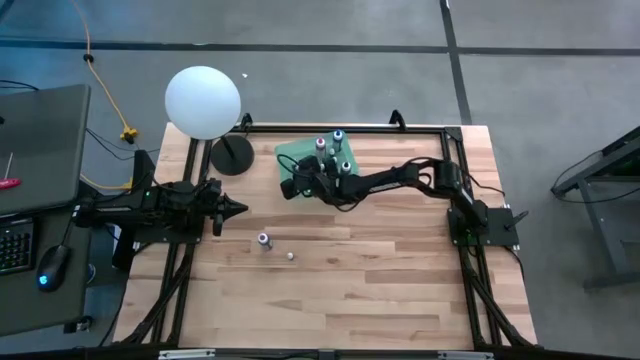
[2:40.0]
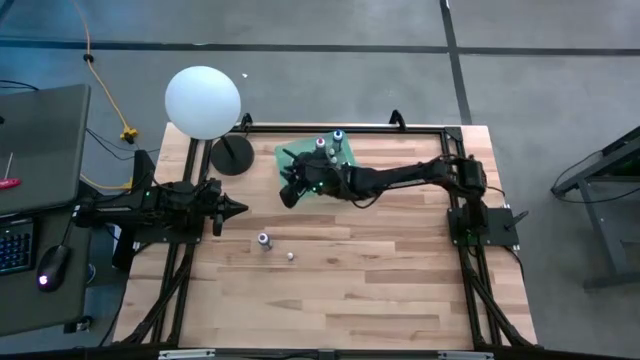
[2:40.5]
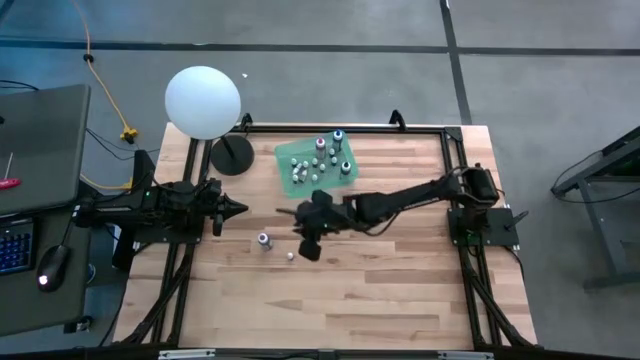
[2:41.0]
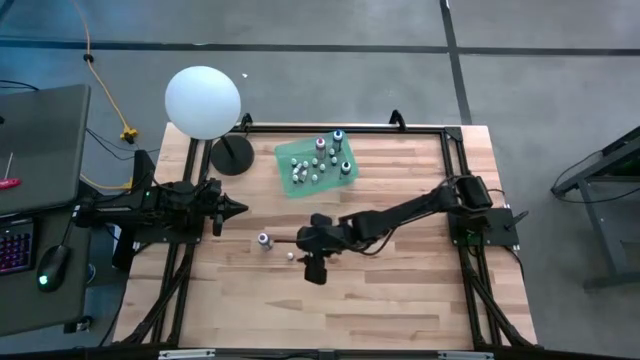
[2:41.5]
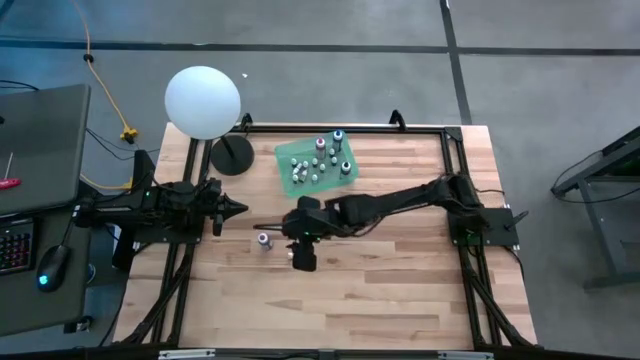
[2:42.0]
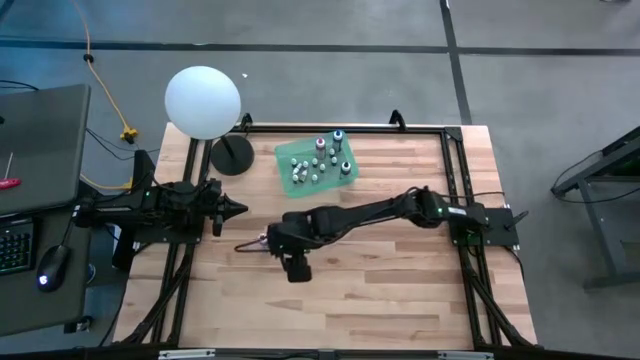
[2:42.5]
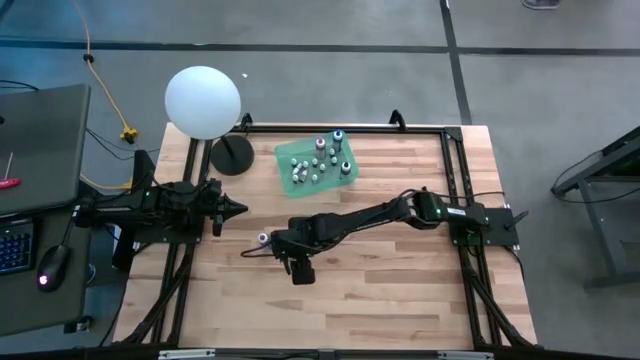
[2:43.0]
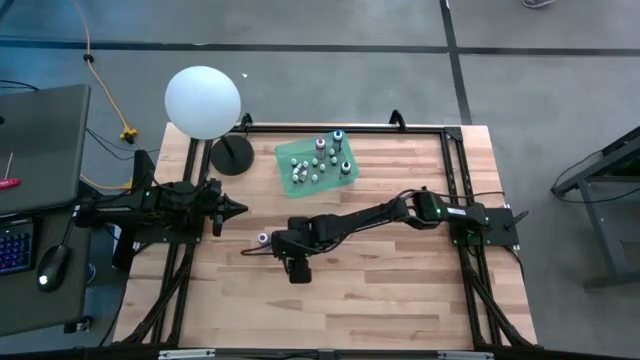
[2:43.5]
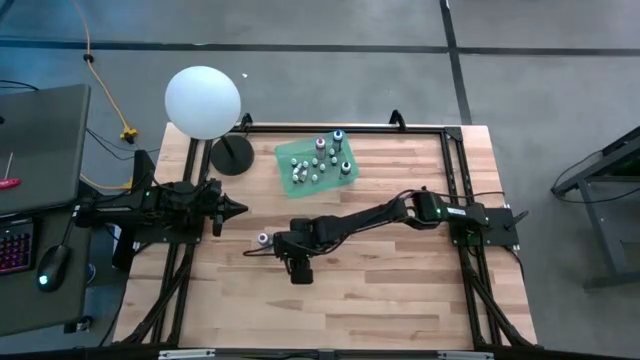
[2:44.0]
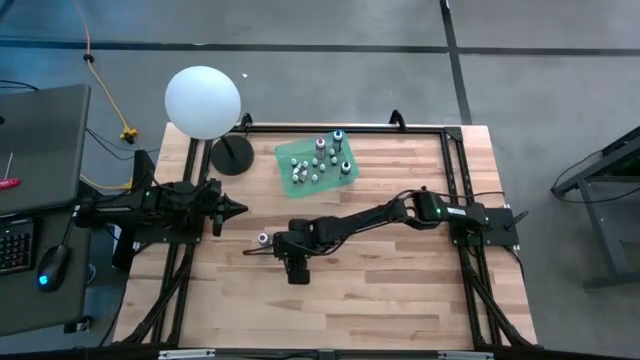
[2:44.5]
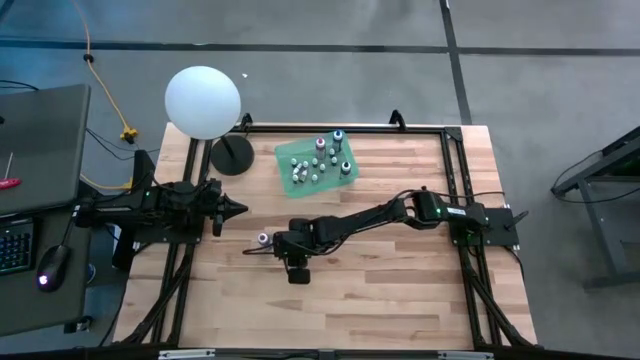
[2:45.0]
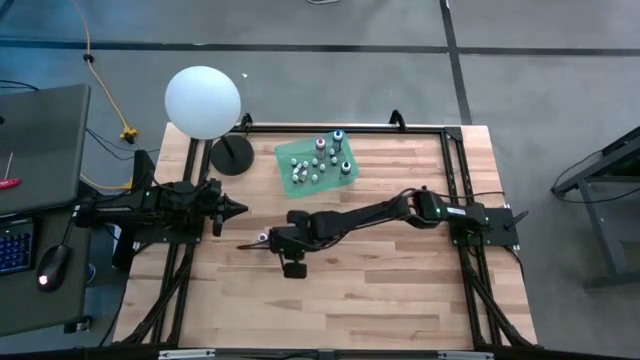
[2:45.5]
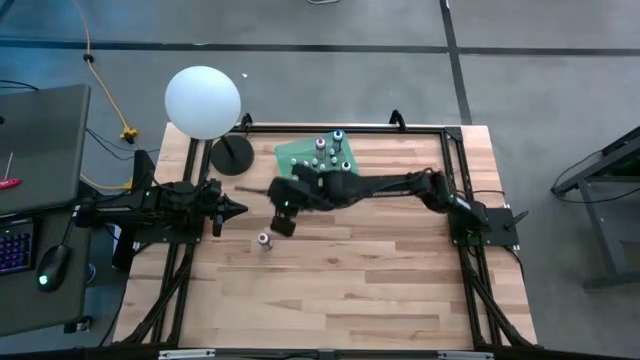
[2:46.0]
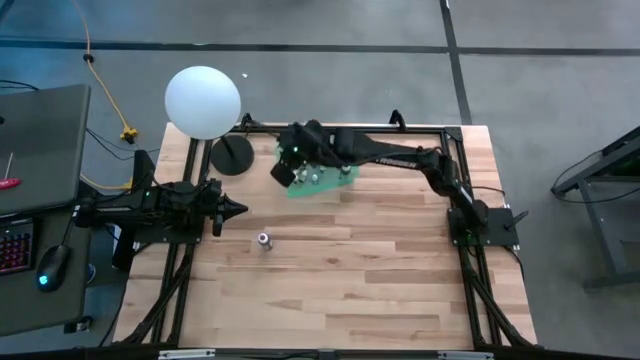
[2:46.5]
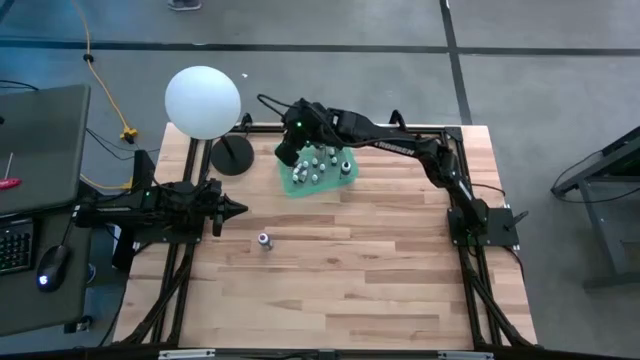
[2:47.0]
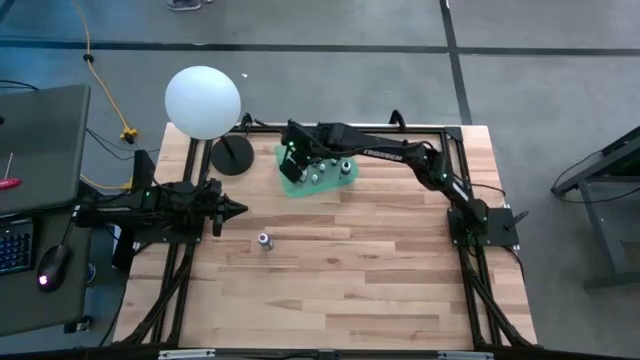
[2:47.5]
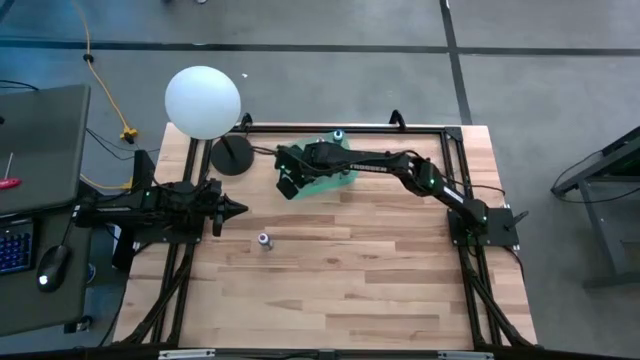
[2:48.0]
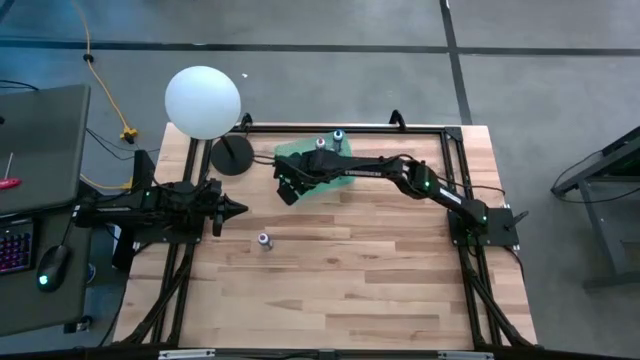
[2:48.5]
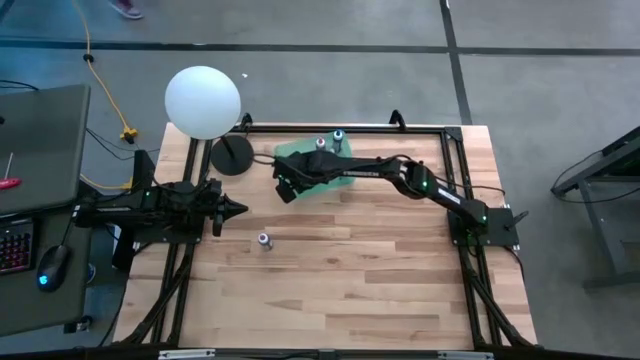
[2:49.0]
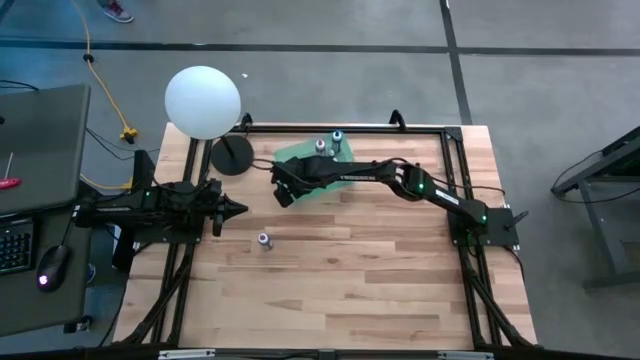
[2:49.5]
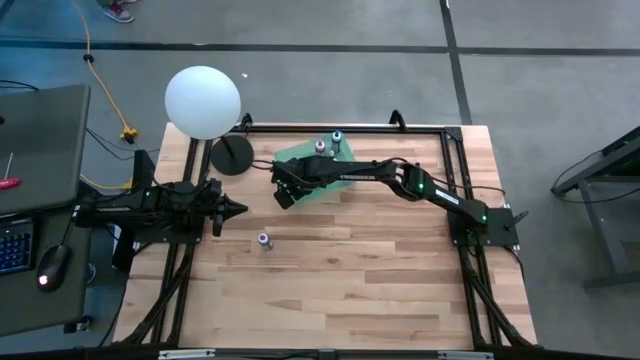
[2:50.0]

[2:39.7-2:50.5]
Task: Pick & Place food coloring
Put the small black dye bottle in the green bin

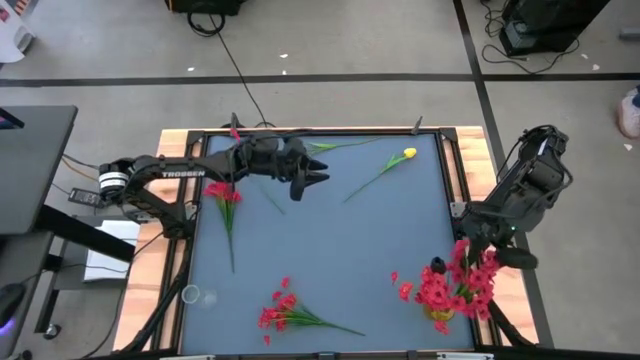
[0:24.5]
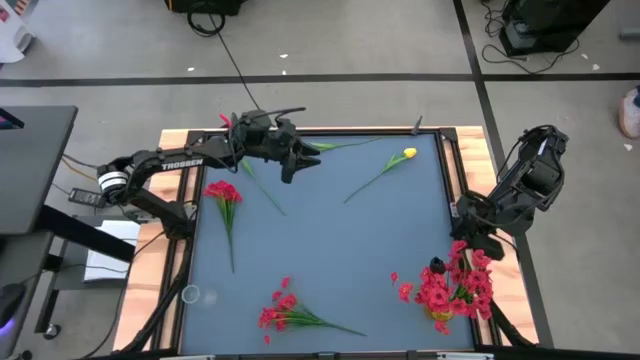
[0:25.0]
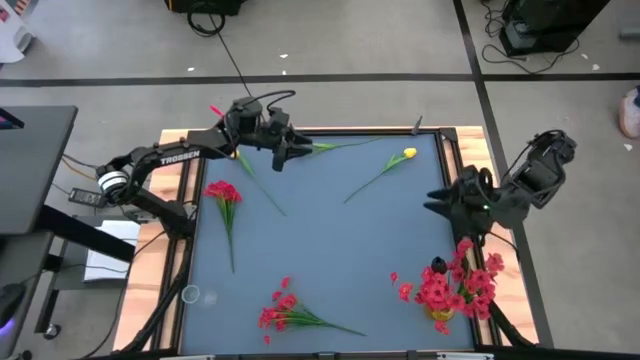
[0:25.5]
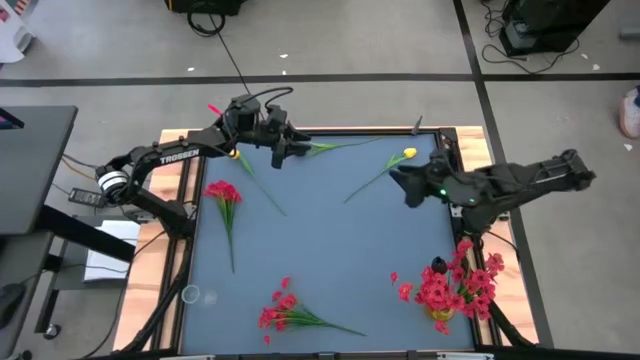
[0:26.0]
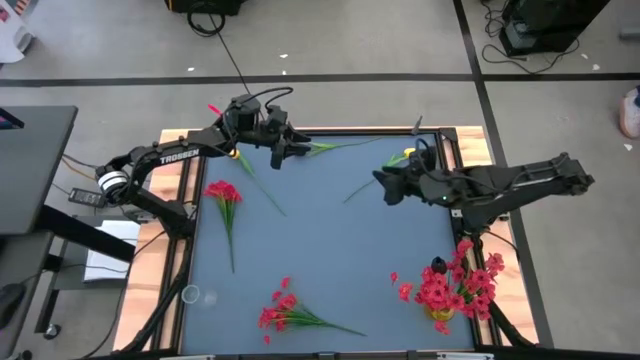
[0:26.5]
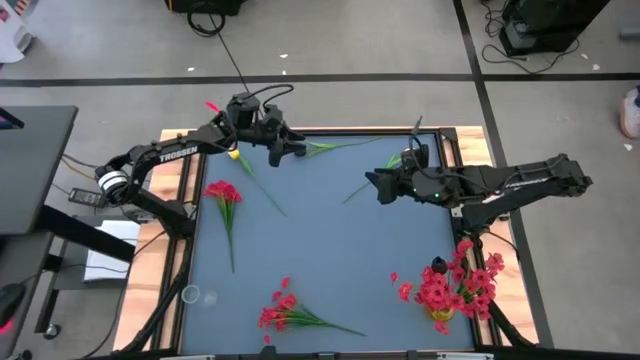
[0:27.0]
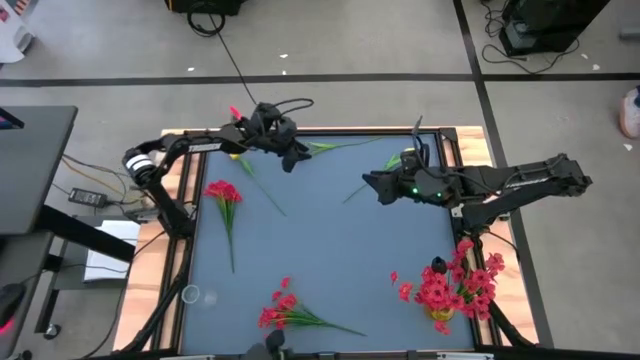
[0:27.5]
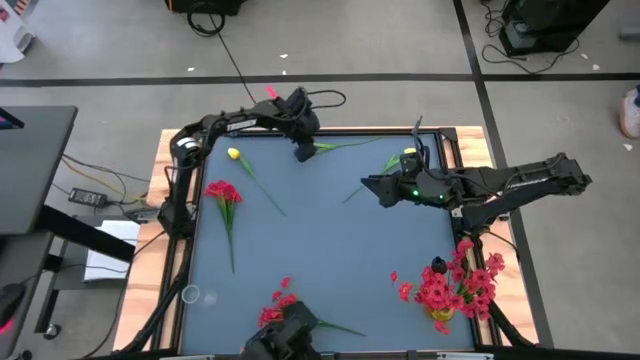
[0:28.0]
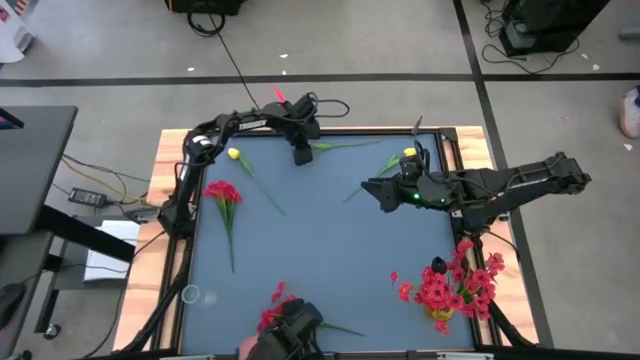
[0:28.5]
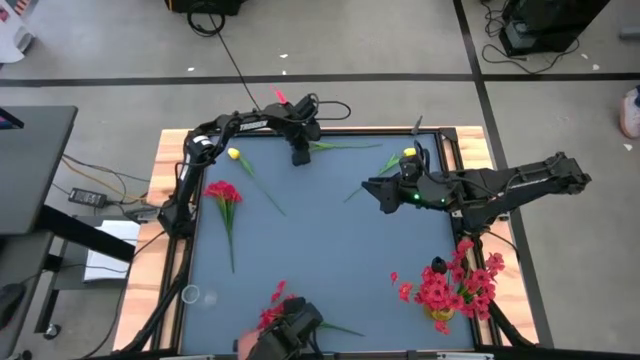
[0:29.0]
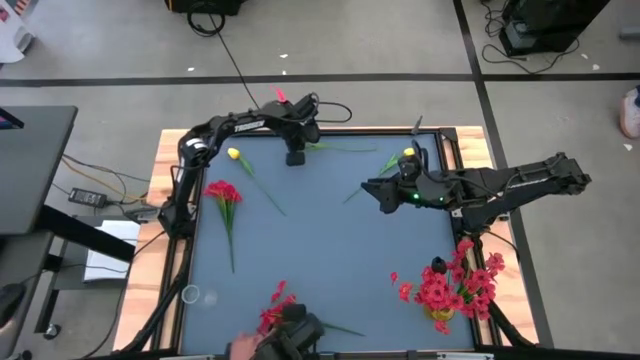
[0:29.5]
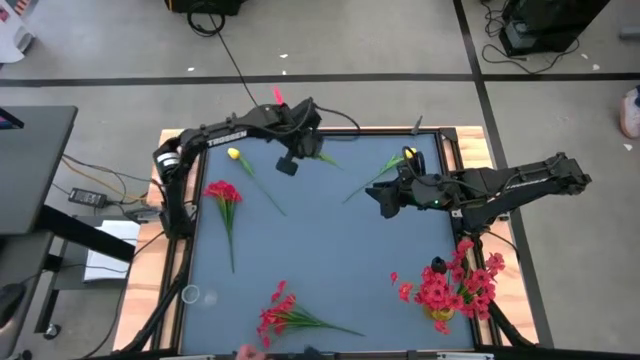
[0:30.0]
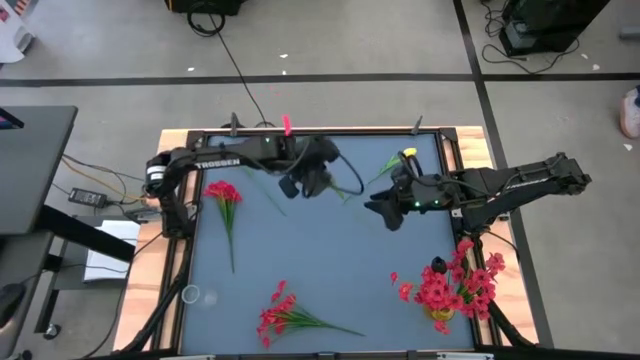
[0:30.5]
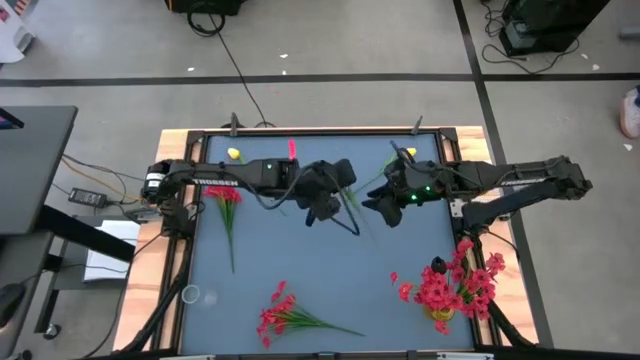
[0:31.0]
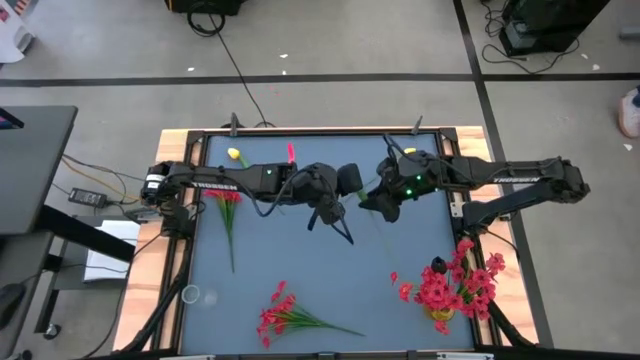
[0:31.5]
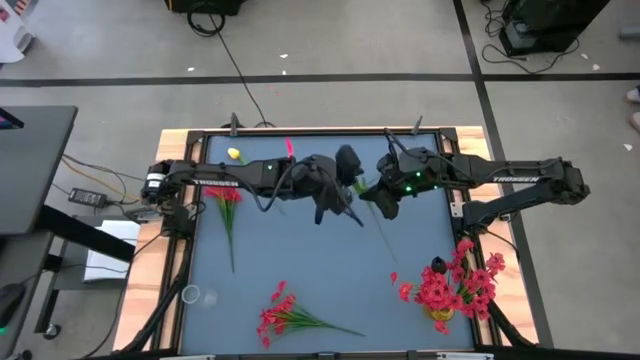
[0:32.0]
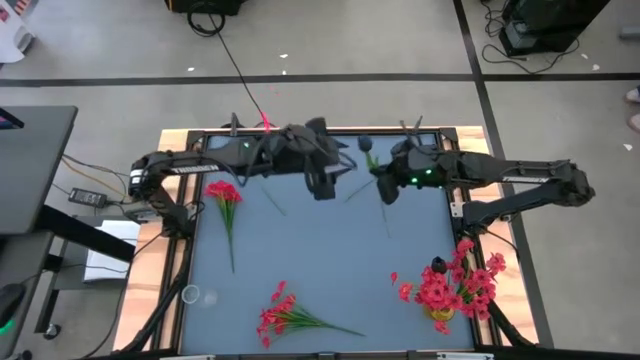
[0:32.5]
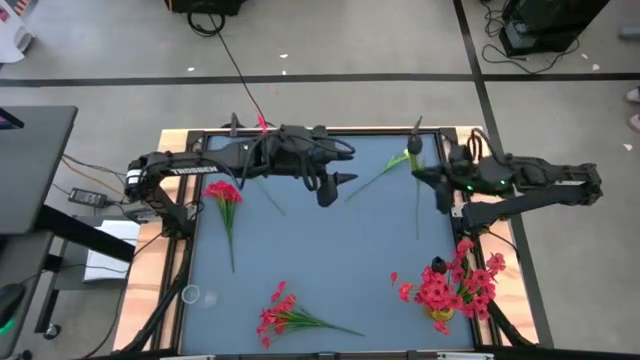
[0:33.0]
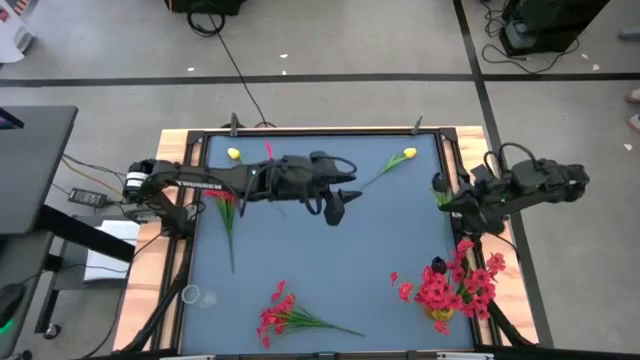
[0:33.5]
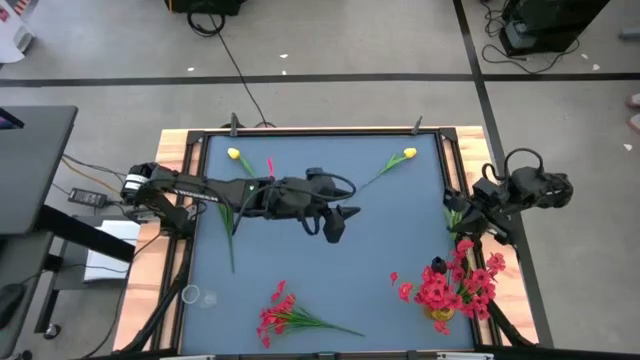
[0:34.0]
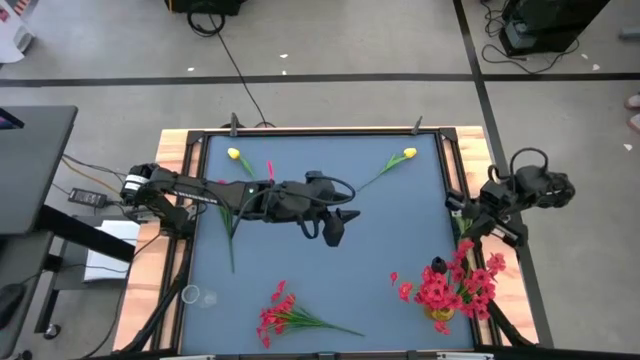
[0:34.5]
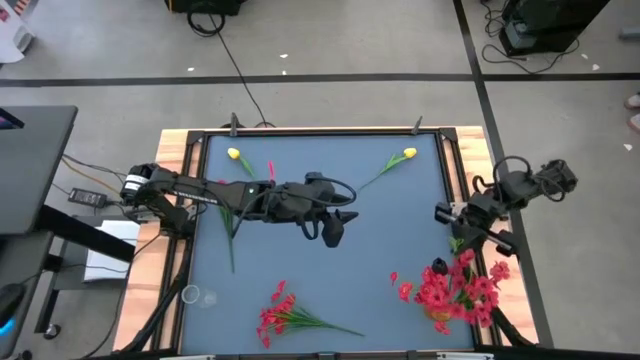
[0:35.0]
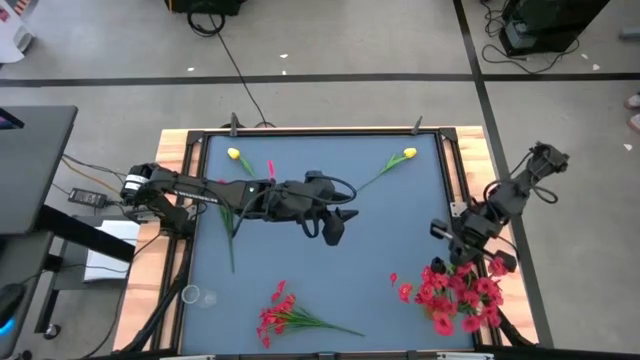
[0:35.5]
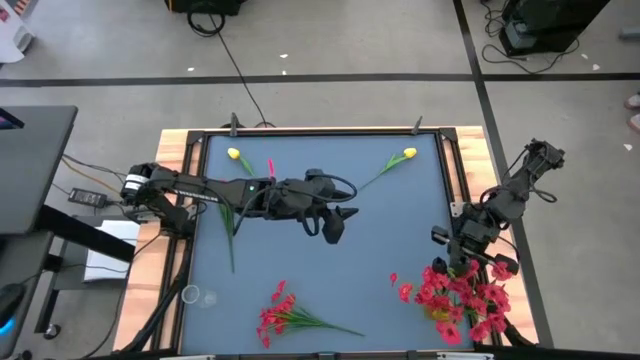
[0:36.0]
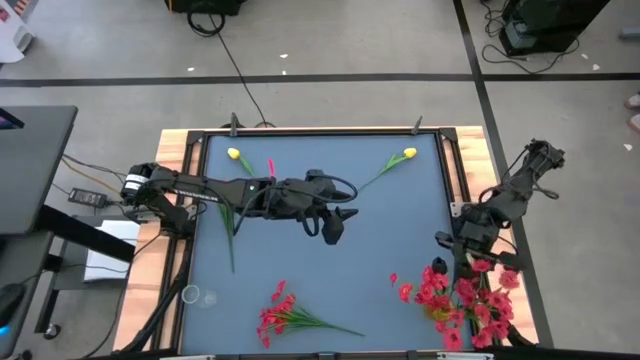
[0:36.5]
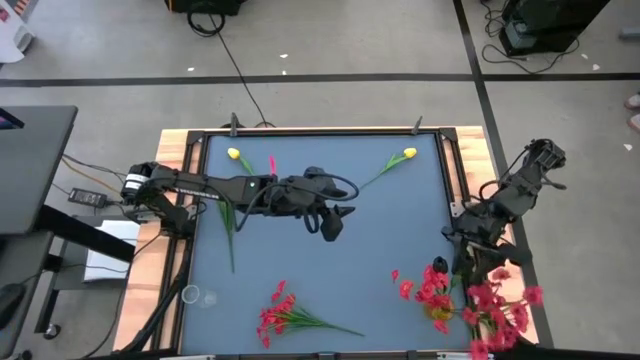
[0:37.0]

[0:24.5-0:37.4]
Task: Sort flowers into vase by color
Put the black flower into the yellow vase
